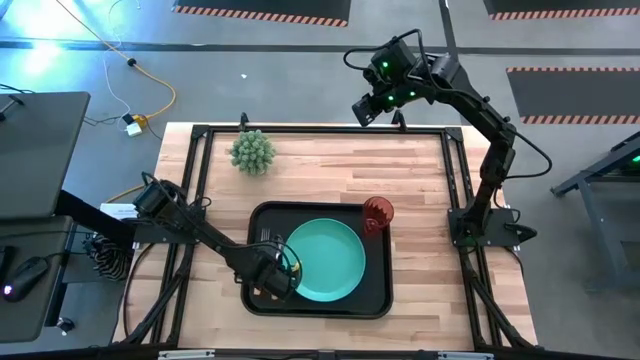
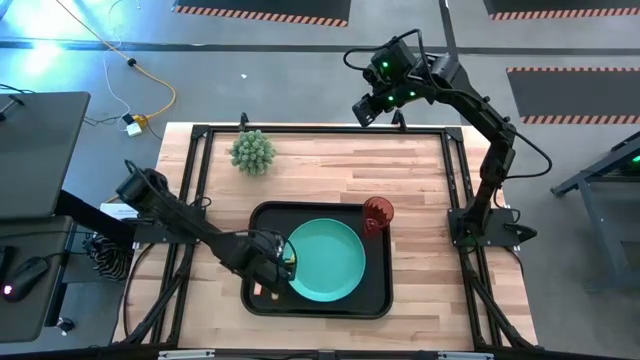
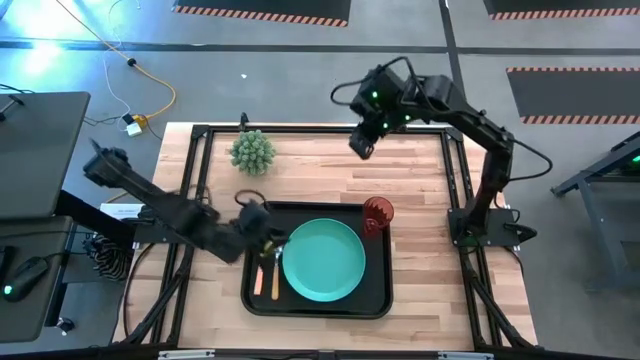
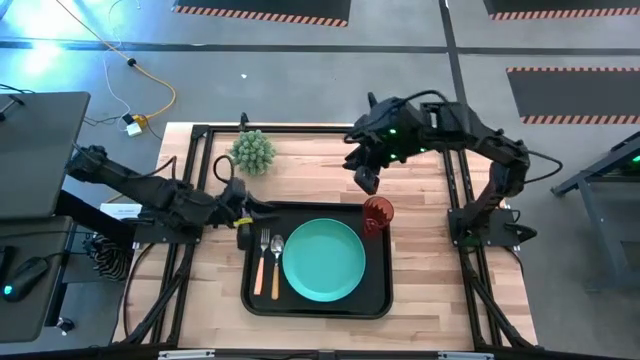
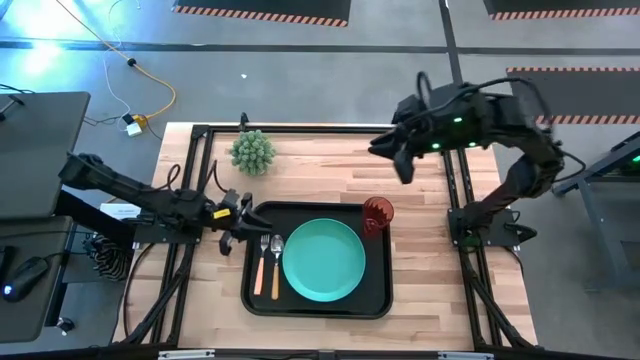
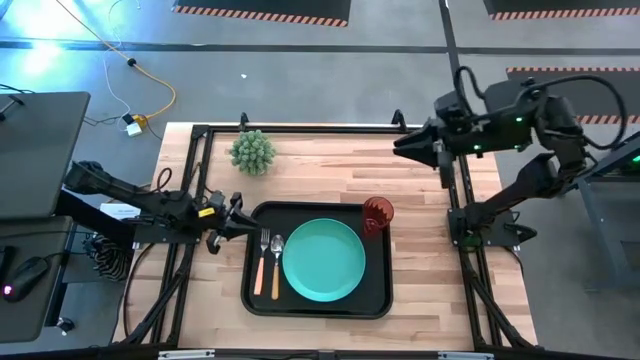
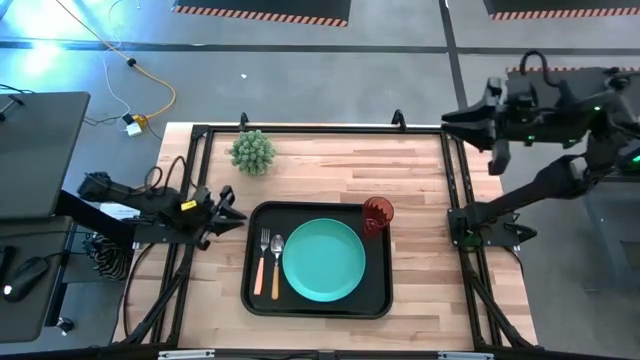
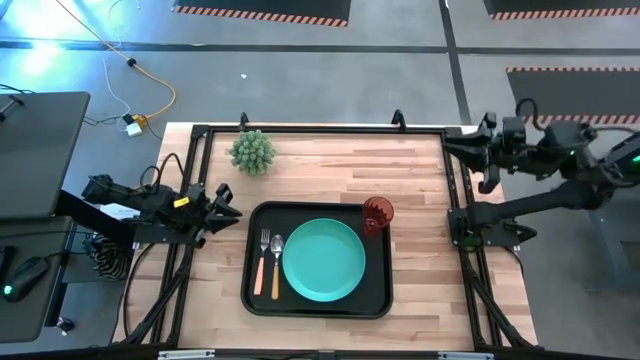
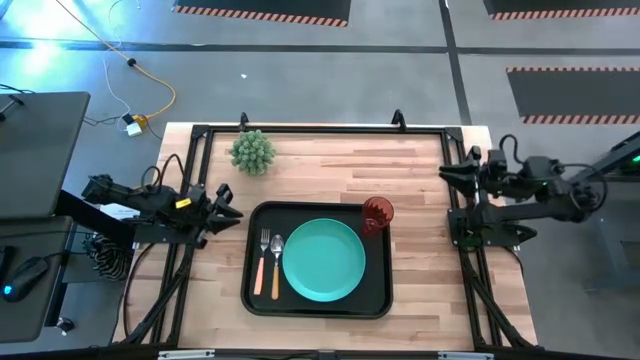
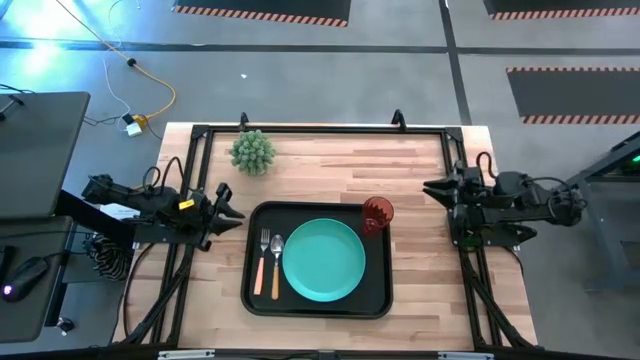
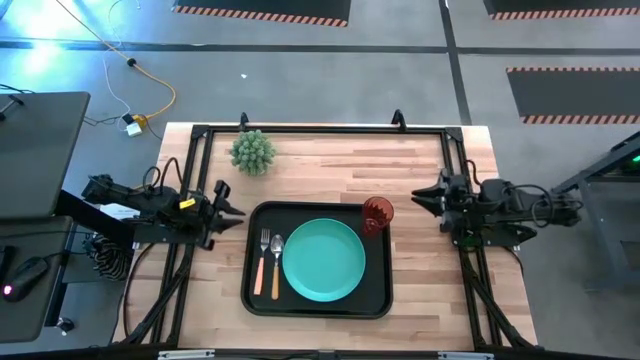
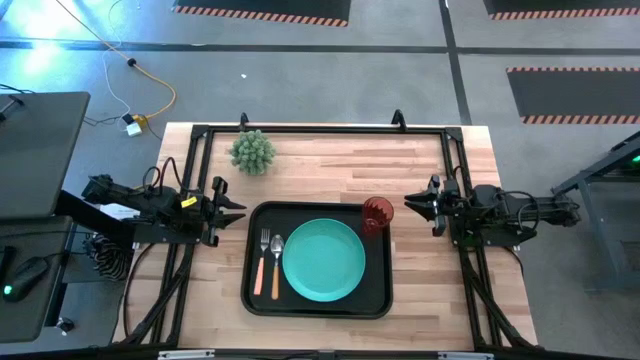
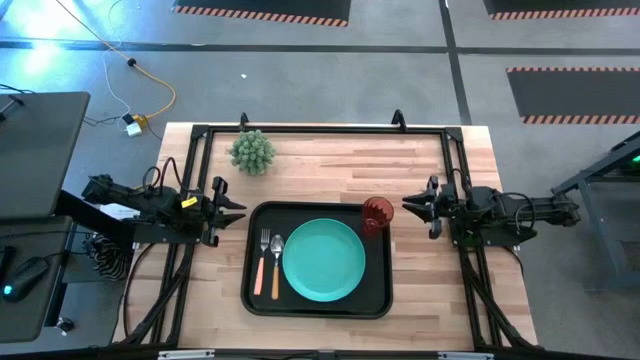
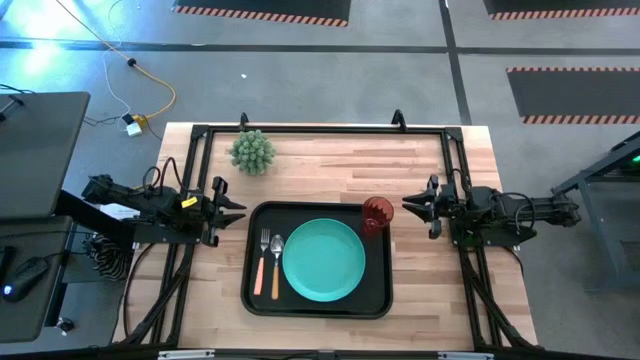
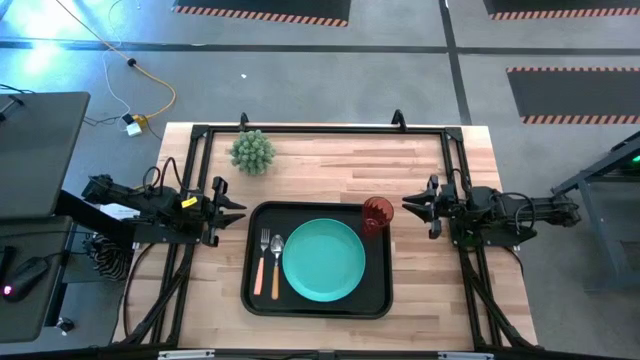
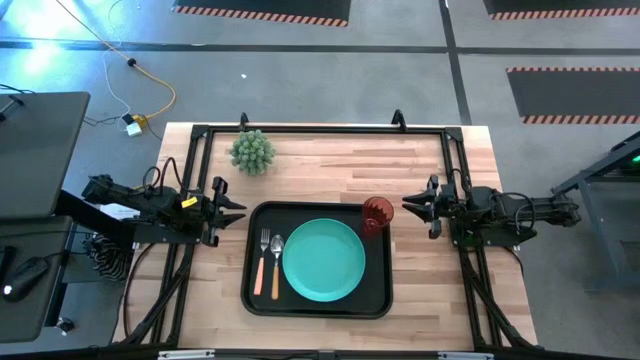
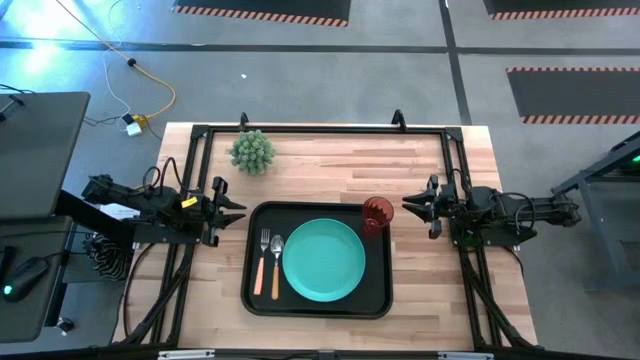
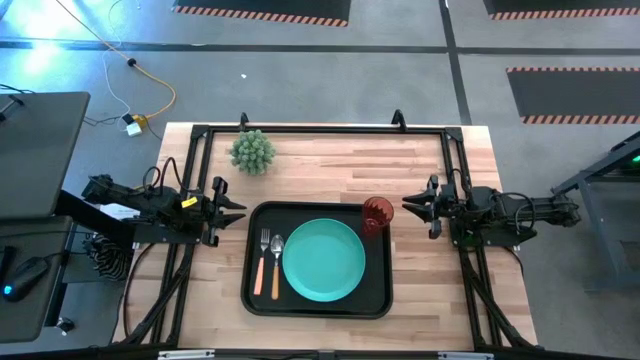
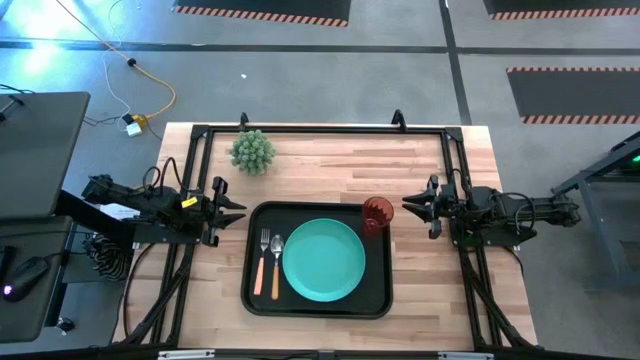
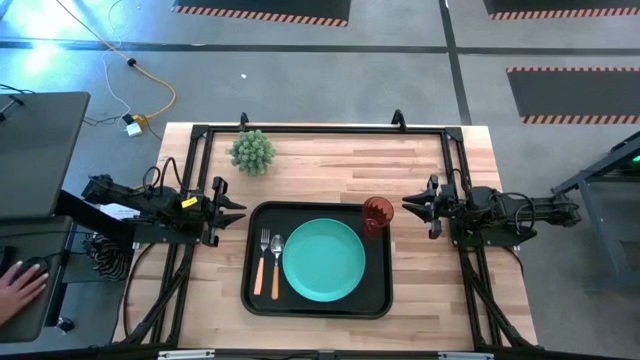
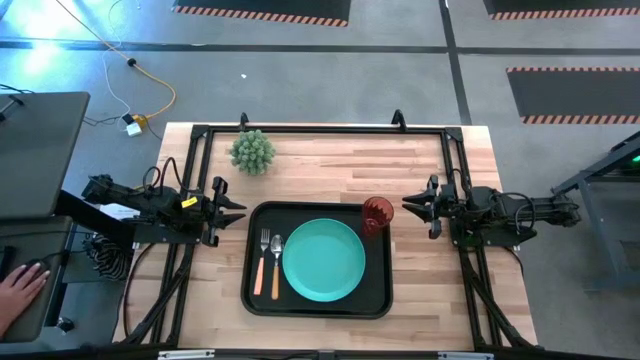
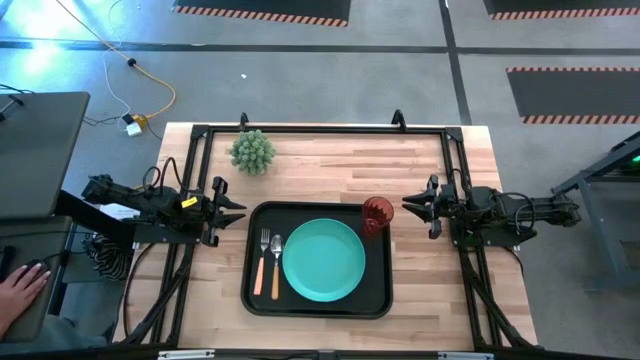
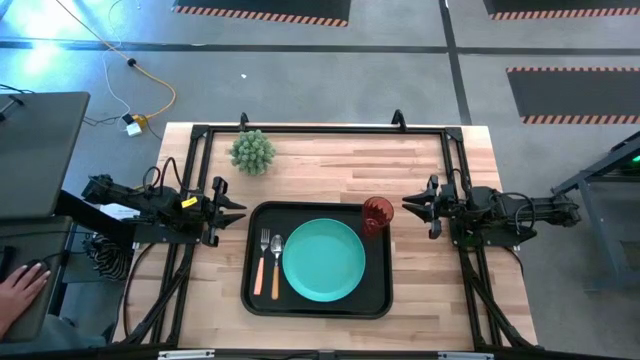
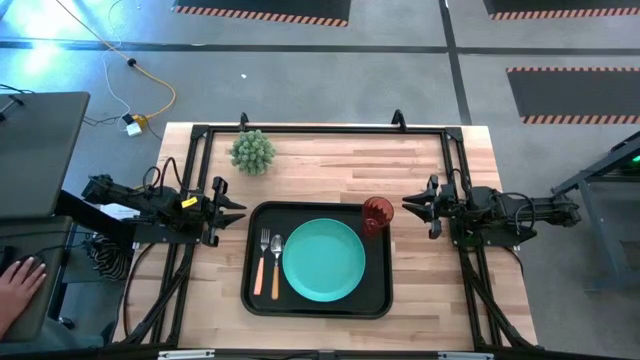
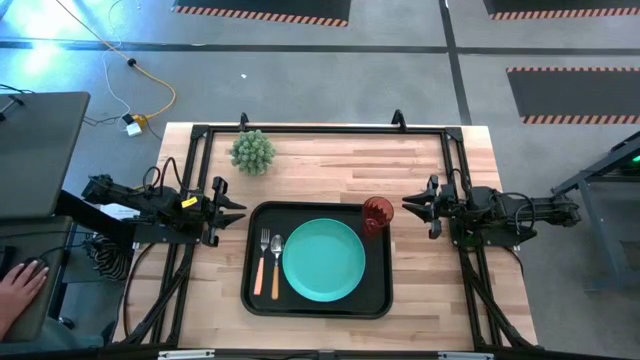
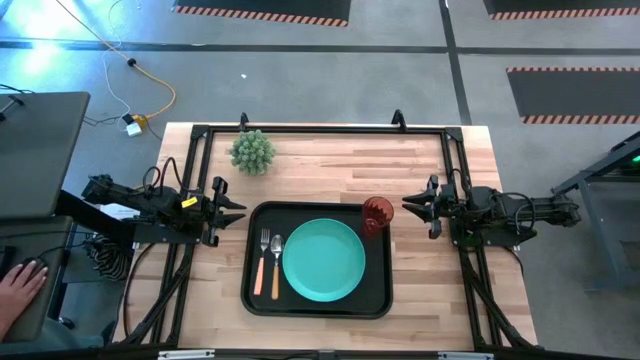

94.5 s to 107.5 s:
Task: Pick and place plate/cup/fork/spoon on tray
Return to Home Position

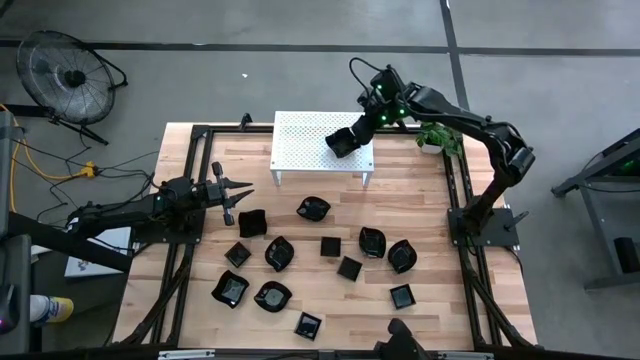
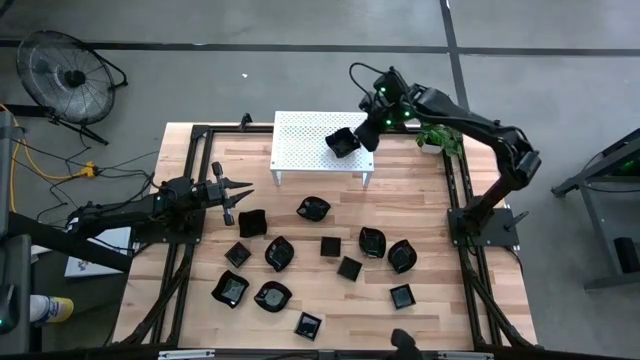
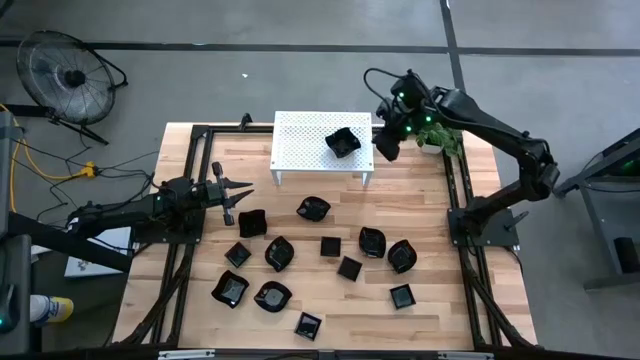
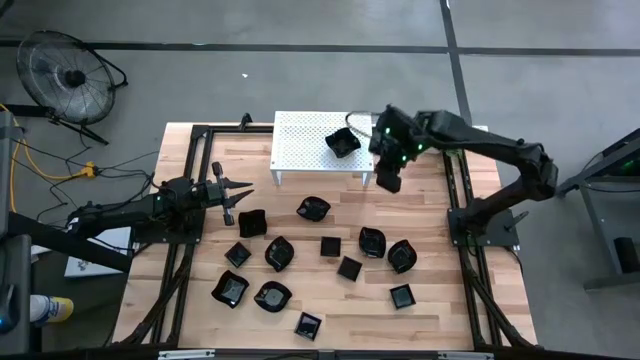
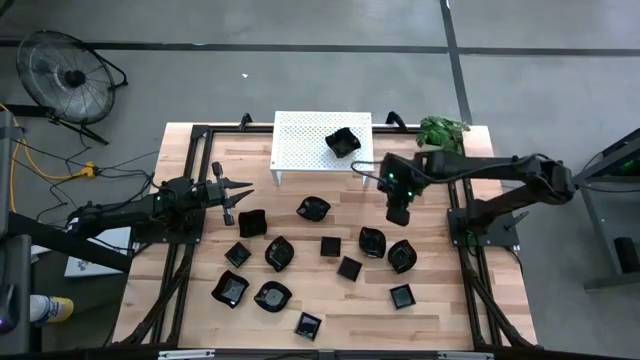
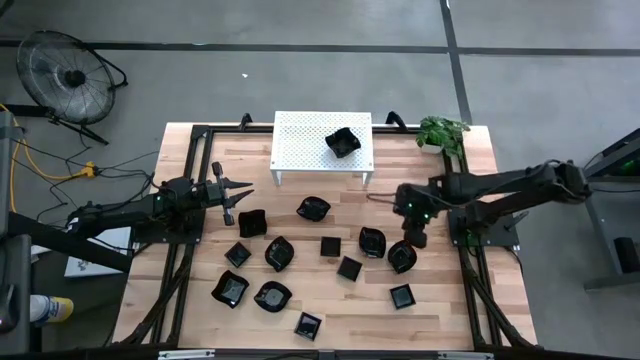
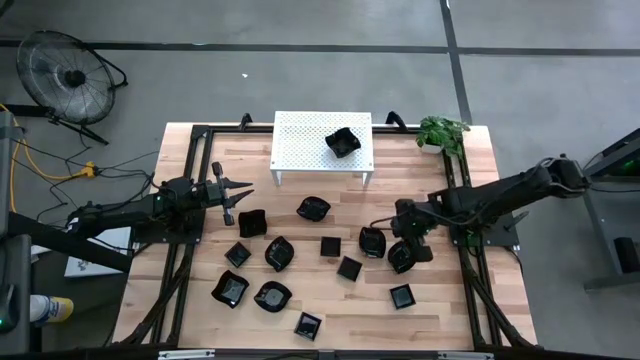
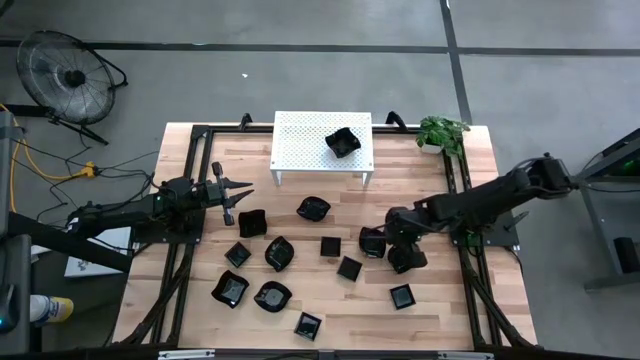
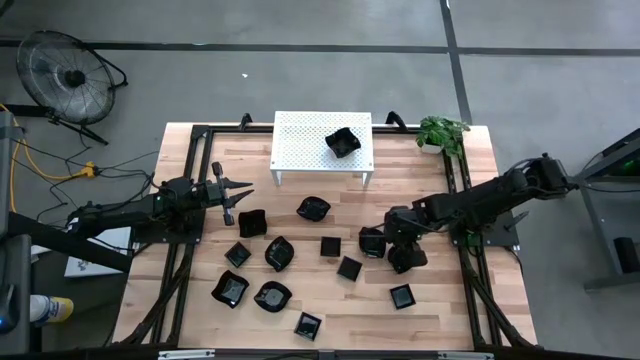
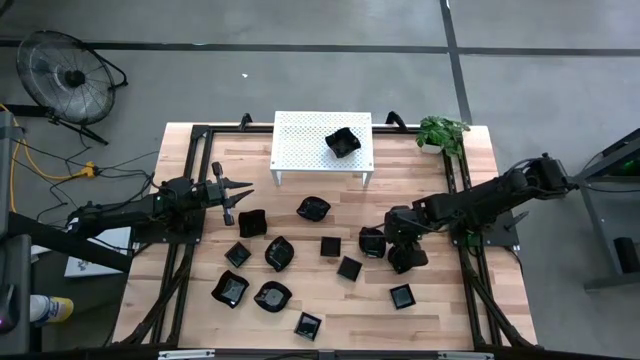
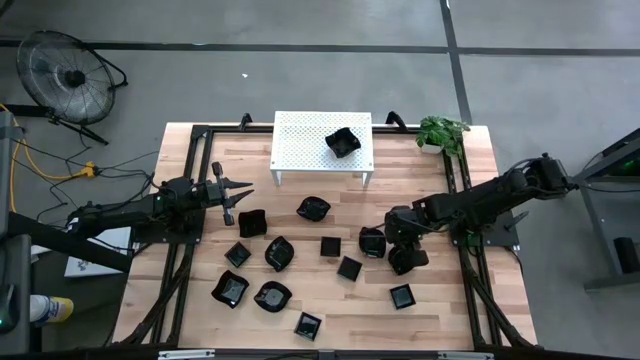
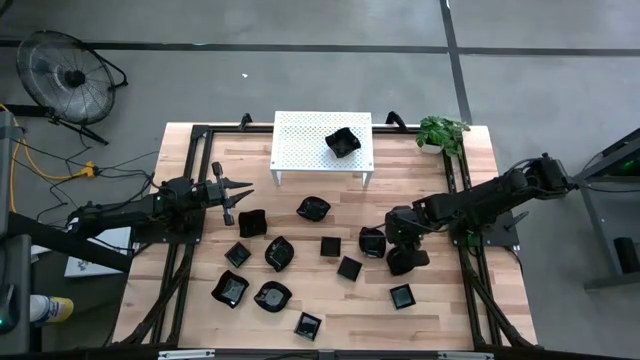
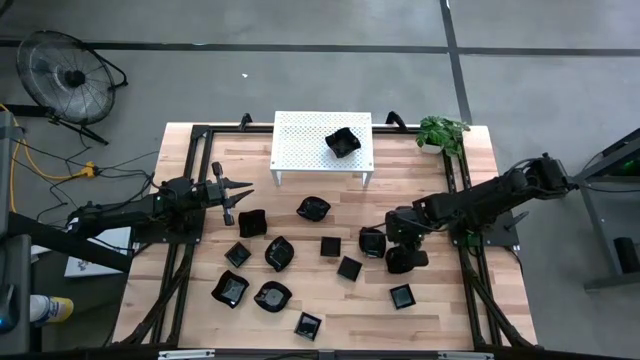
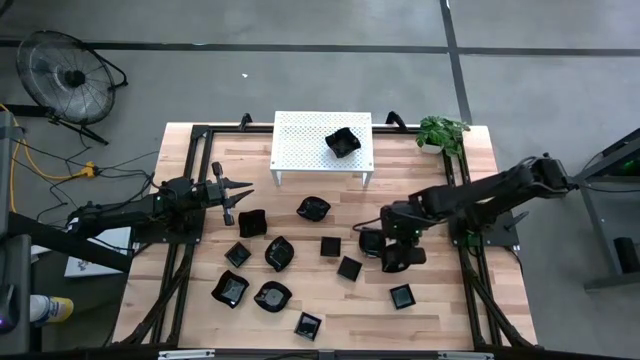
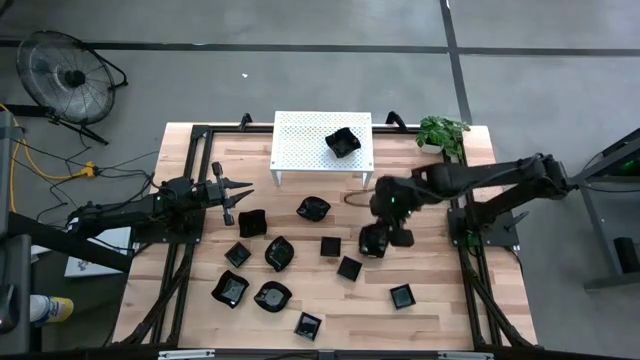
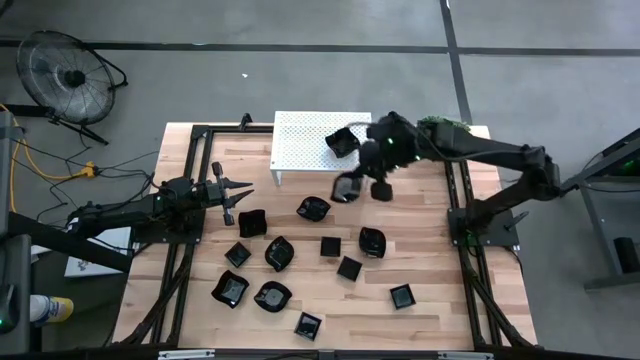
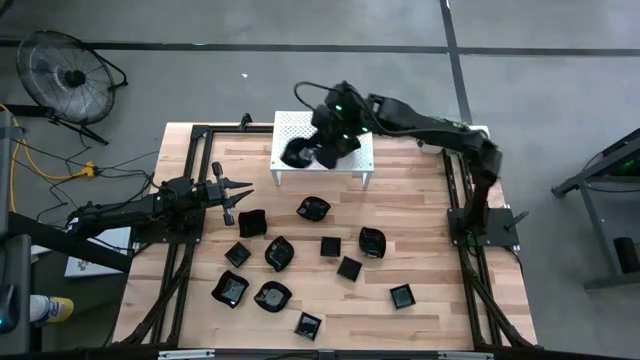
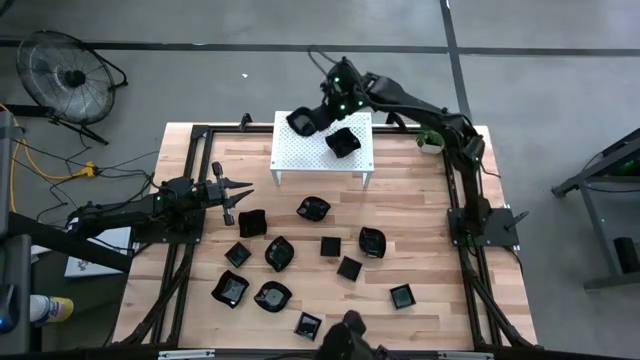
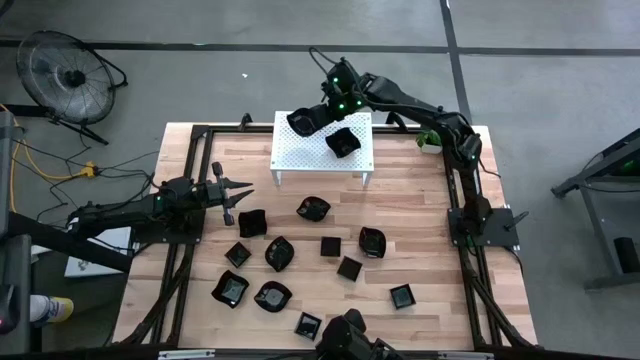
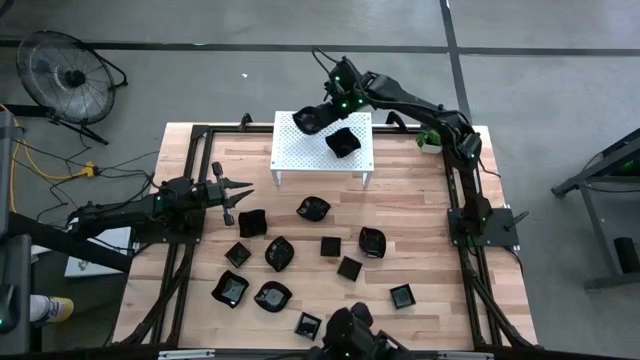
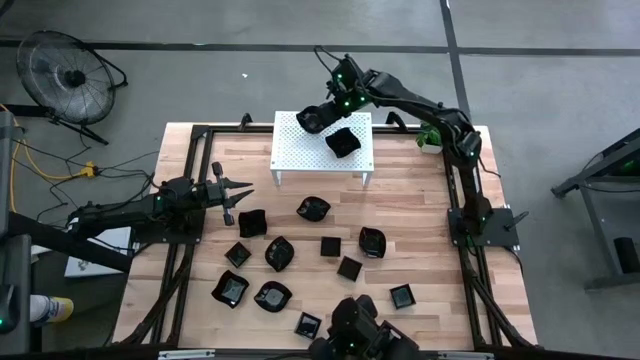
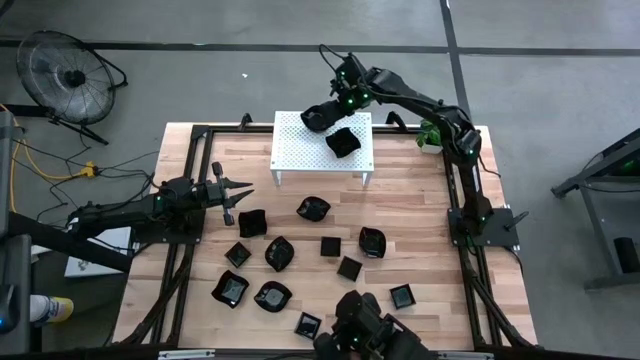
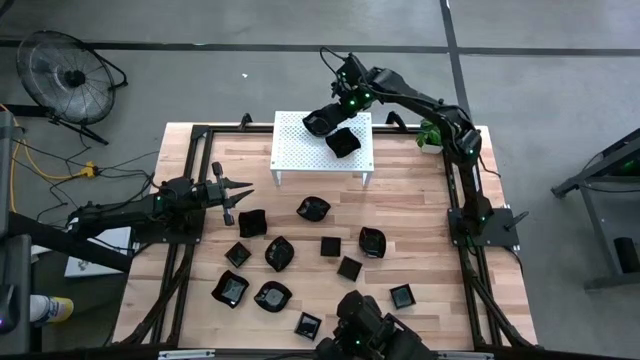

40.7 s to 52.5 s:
Task: Pick & Place Mini shaped plates
Put the black leaf-shaped plate on the shelf
